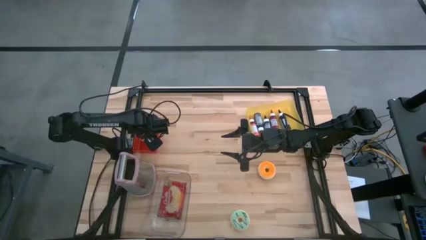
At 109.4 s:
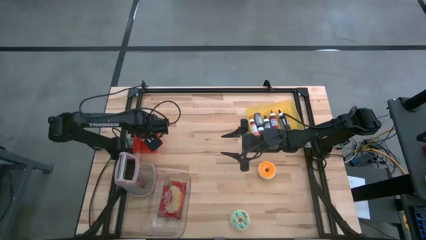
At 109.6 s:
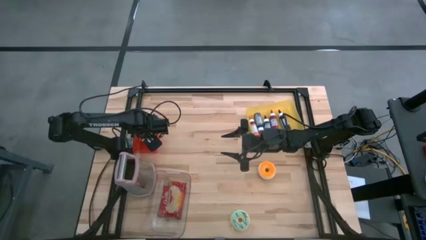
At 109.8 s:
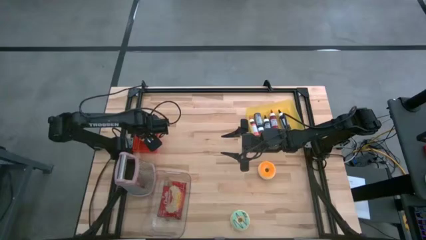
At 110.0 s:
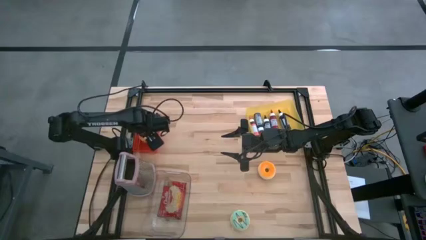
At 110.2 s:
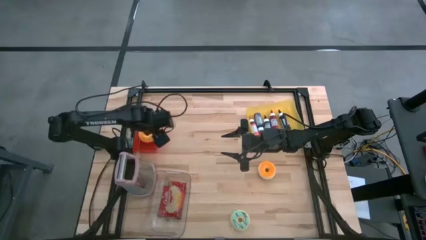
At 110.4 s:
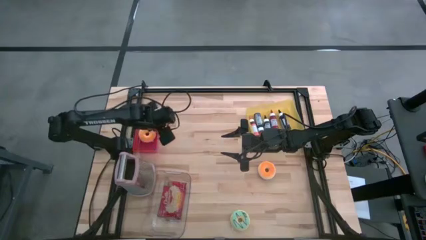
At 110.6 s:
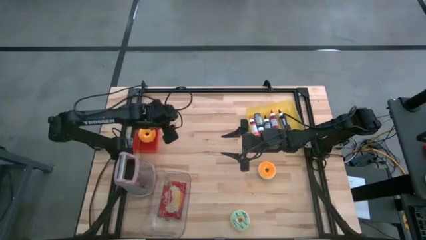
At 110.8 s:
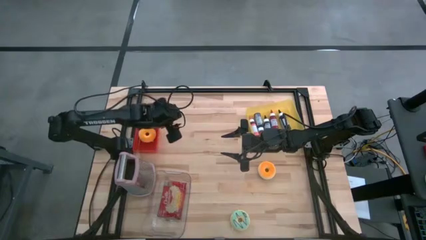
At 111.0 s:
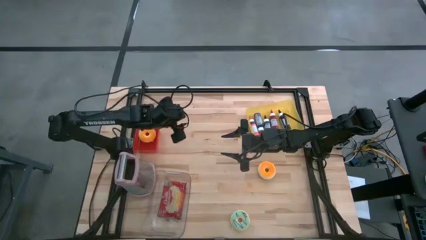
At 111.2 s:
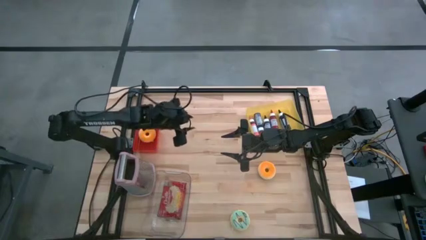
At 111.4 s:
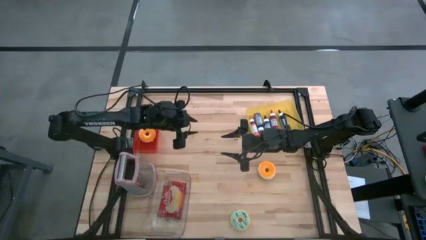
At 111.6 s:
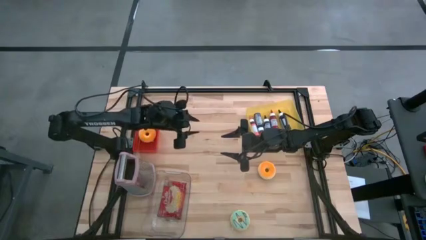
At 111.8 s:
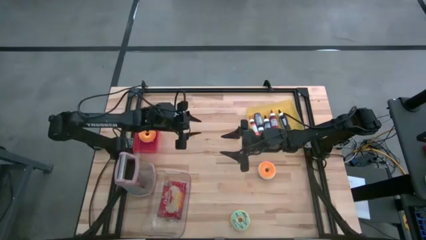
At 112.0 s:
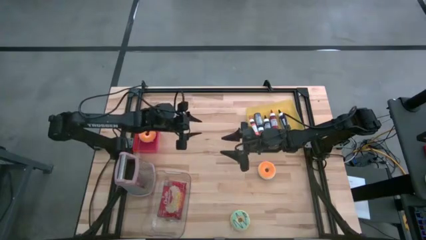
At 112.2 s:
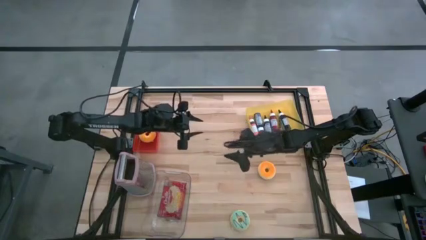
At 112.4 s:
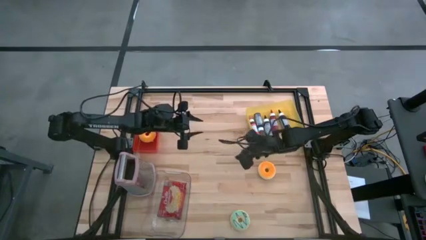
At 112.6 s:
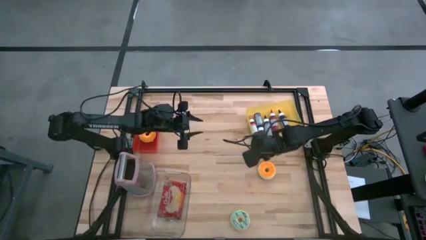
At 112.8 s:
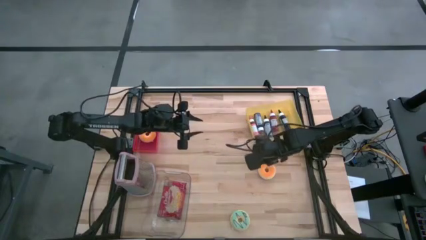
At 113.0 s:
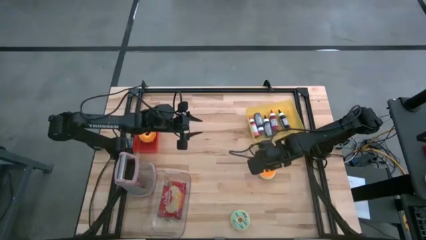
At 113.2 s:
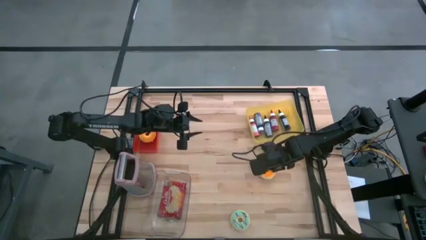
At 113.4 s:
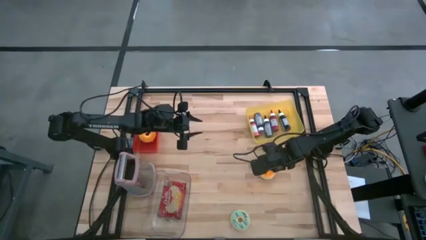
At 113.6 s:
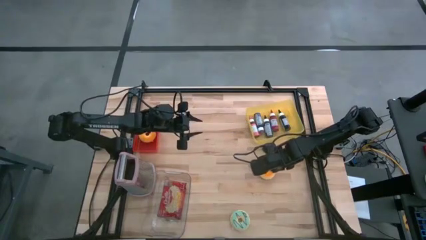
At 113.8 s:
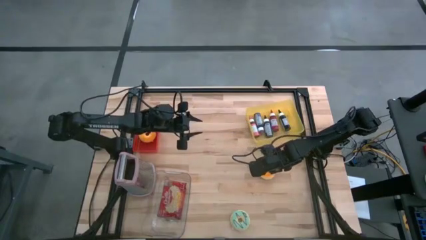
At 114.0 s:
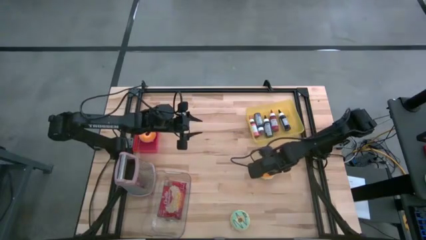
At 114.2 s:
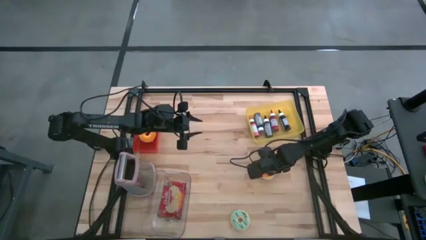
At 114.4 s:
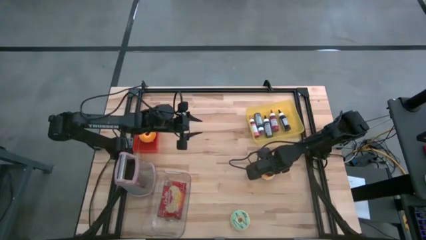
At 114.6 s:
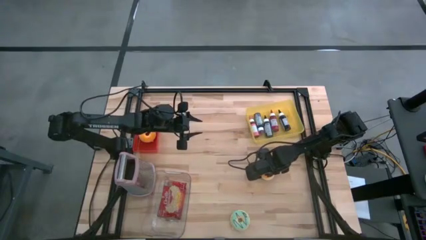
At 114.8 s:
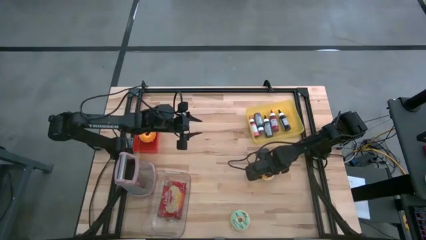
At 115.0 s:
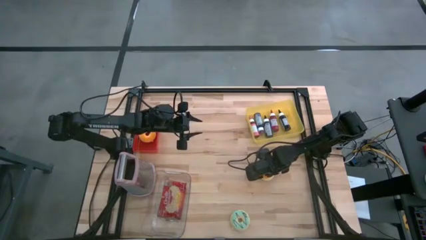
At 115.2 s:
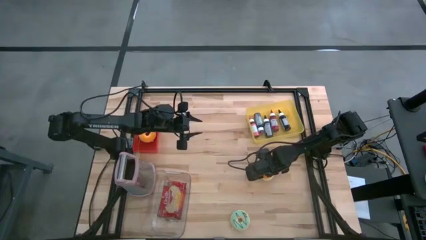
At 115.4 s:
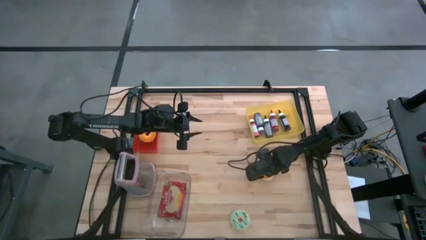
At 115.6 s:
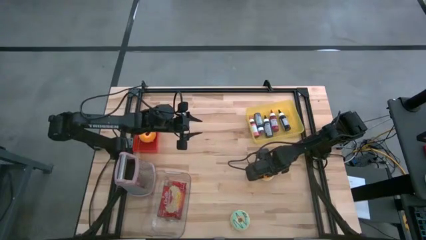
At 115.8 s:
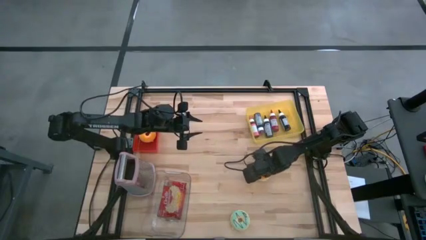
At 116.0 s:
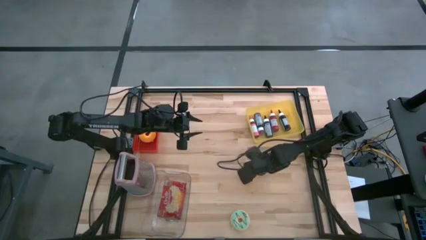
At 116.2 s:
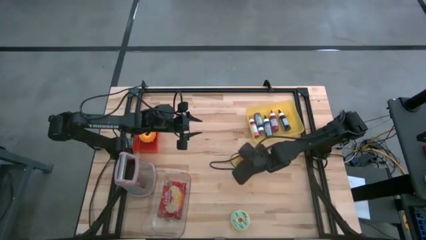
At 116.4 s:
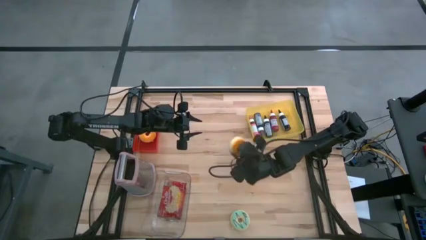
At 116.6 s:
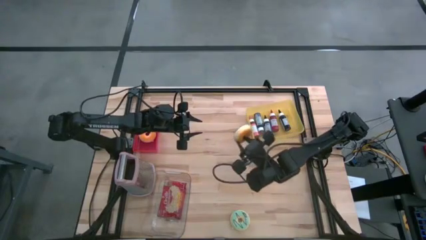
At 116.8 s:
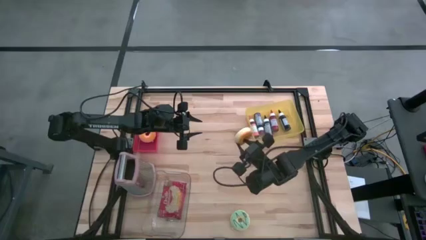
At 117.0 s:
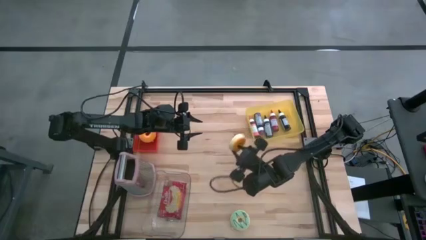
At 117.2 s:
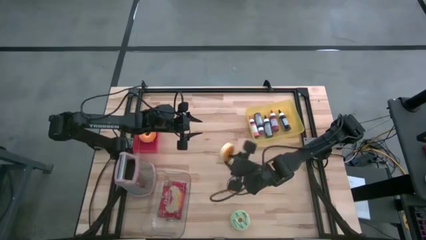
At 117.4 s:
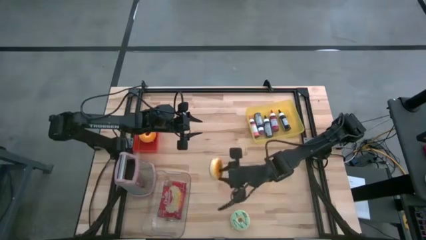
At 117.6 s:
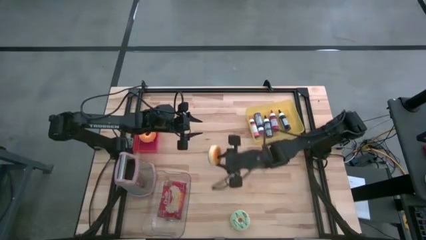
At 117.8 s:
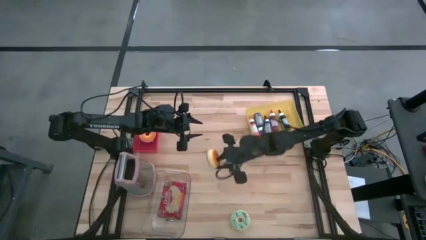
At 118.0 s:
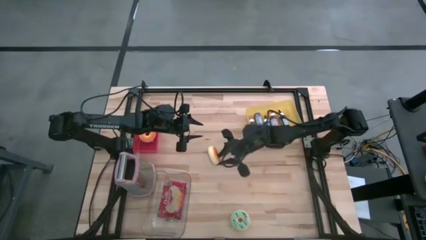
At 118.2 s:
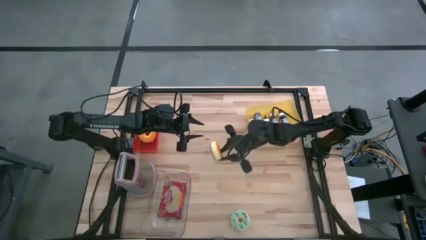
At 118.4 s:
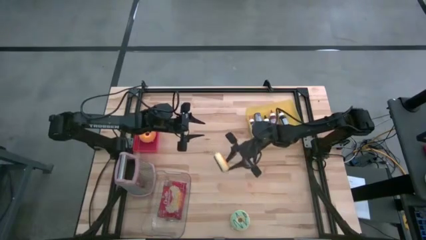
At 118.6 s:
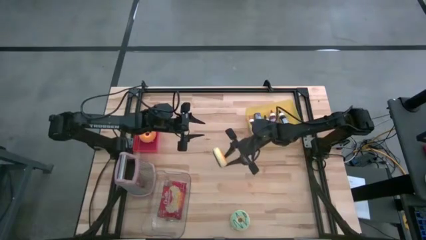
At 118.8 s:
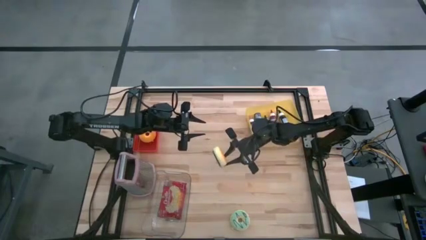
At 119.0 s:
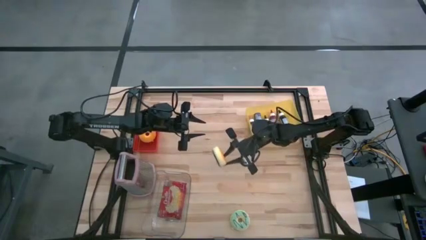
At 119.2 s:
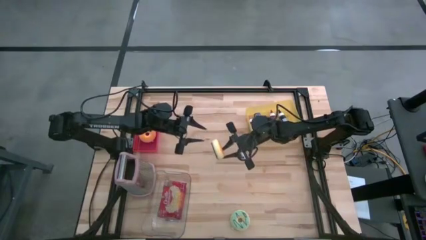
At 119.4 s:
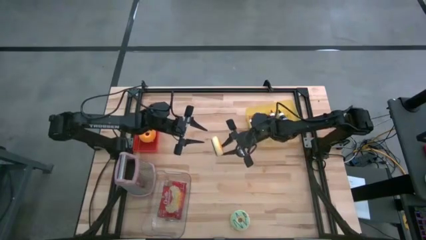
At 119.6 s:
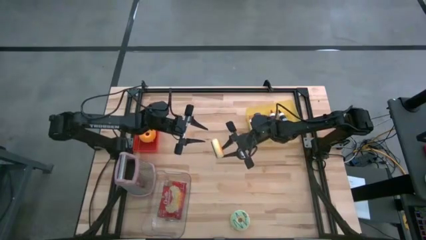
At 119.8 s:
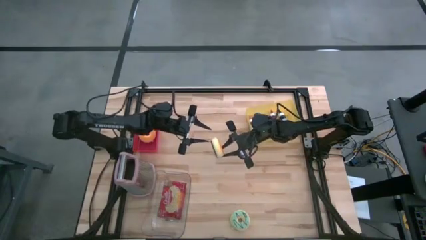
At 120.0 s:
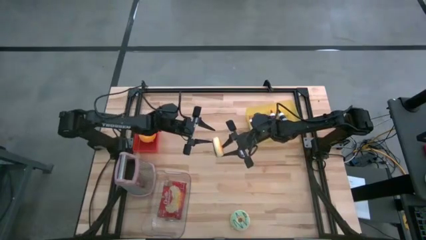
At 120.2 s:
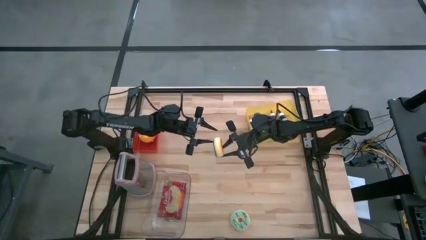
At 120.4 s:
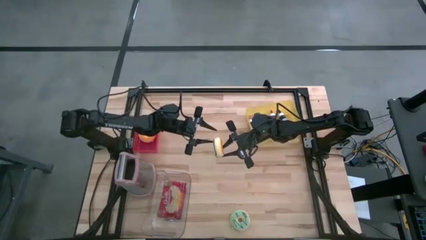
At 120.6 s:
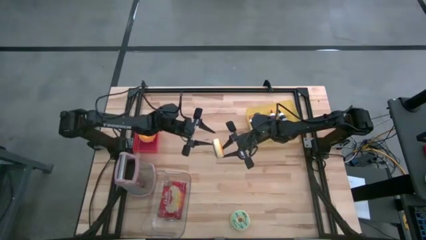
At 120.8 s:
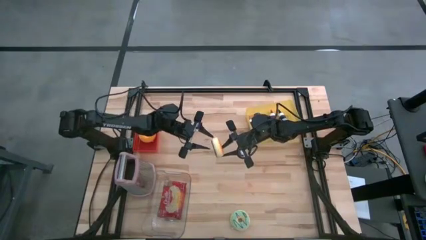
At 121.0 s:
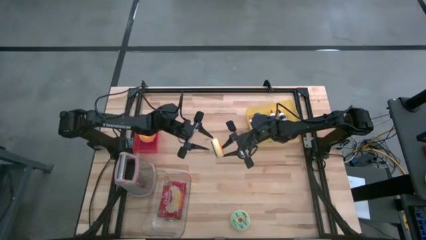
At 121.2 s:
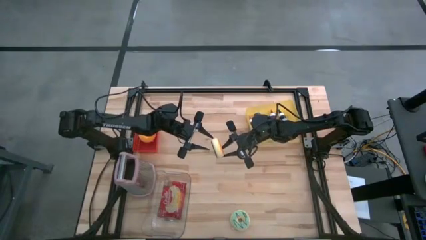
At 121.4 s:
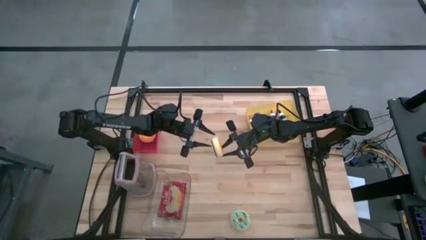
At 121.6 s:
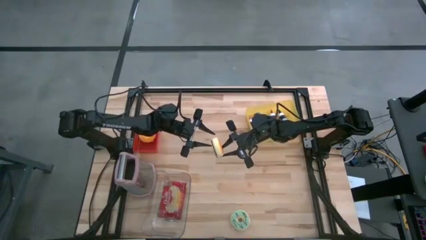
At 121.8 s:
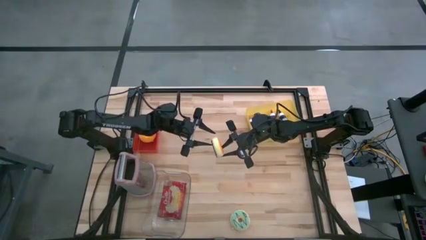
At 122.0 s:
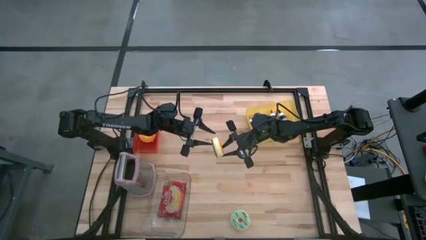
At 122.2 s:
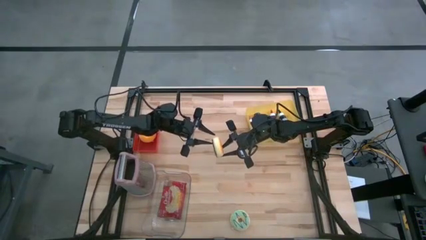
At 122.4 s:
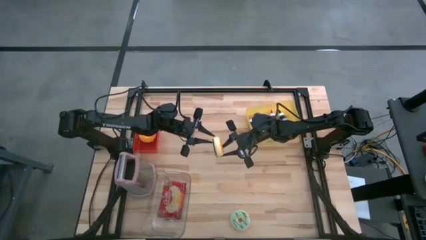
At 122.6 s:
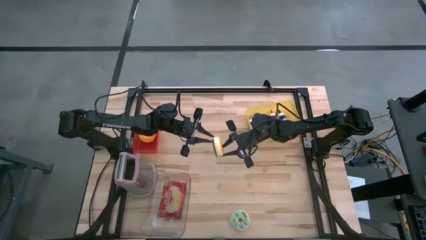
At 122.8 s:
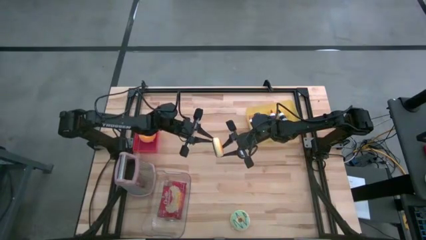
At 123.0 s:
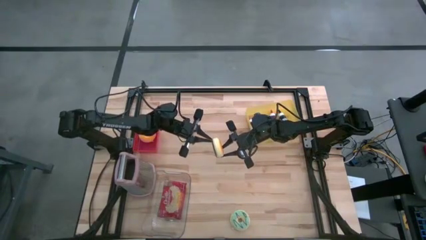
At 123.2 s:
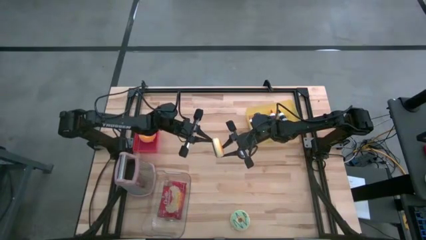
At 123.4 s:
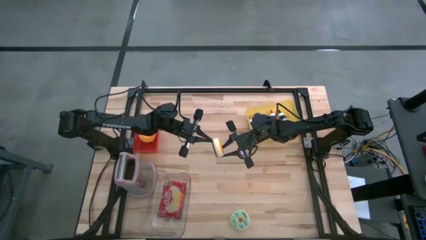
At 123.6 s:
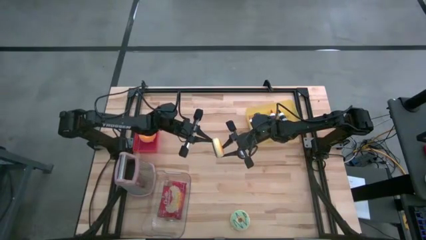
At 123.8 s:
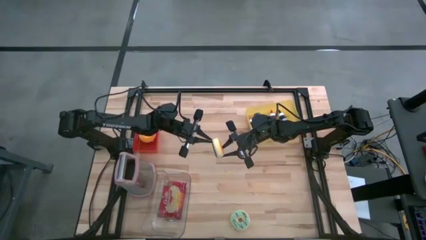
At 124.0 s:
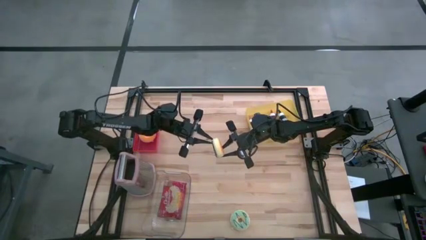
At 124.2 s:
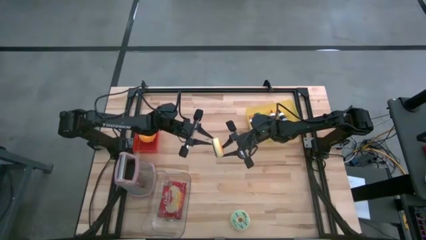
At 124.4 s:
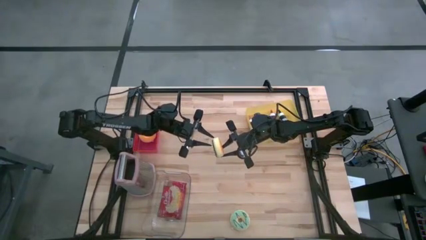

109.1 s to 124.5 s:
Task: Pick & Place Food Item
Put the black donut into the red bin
